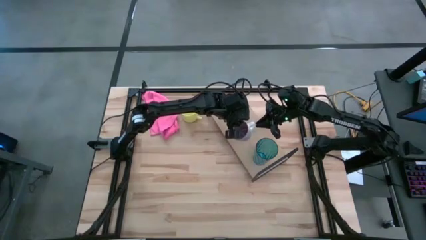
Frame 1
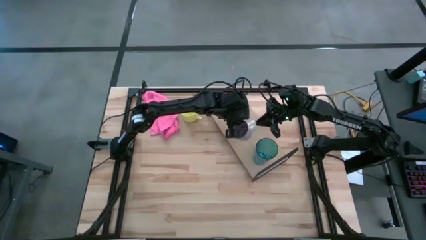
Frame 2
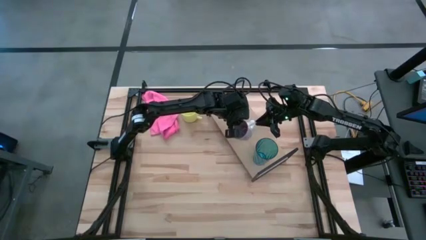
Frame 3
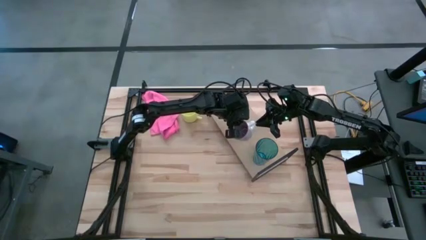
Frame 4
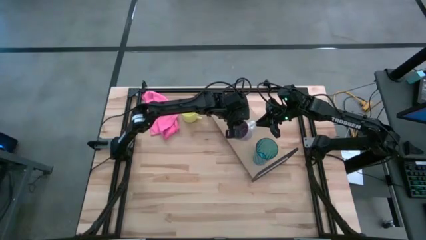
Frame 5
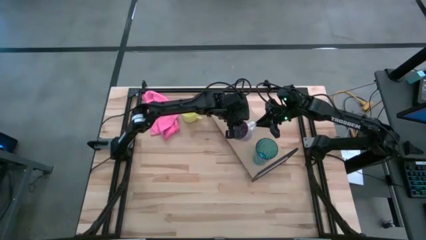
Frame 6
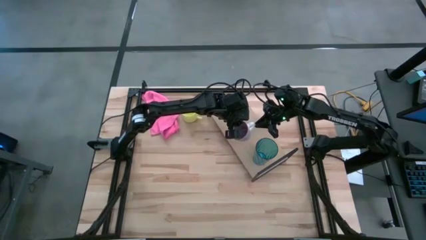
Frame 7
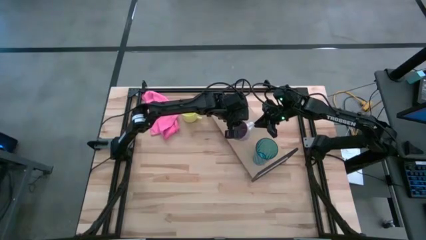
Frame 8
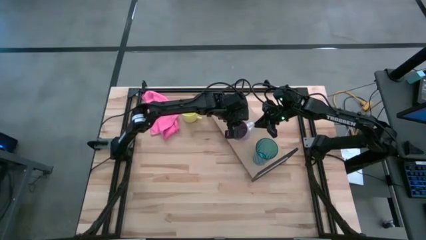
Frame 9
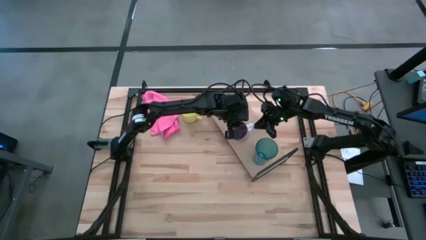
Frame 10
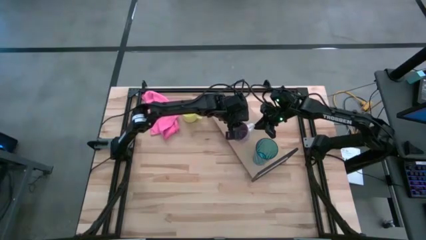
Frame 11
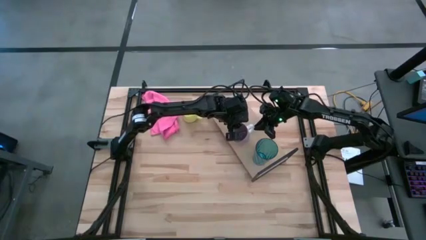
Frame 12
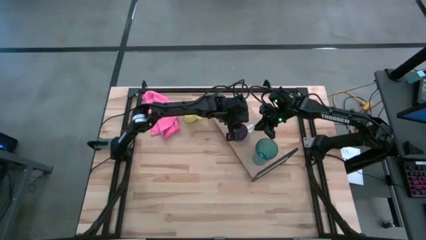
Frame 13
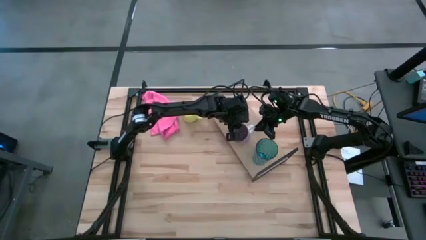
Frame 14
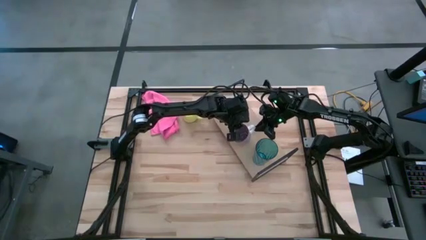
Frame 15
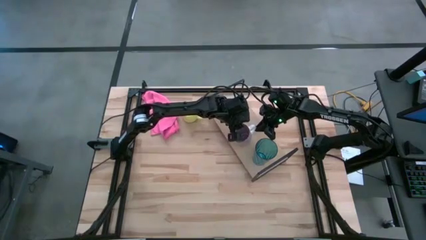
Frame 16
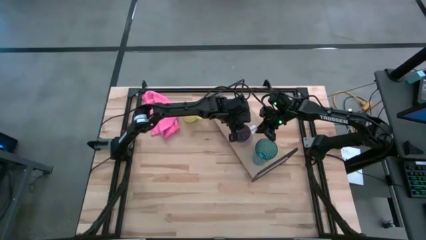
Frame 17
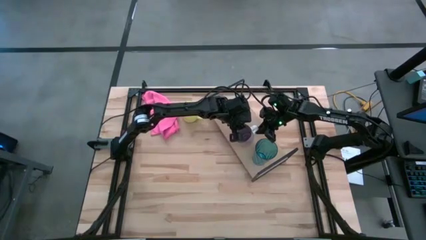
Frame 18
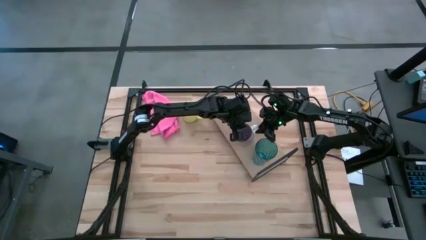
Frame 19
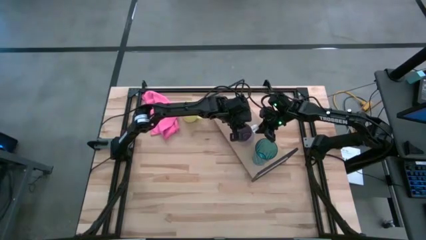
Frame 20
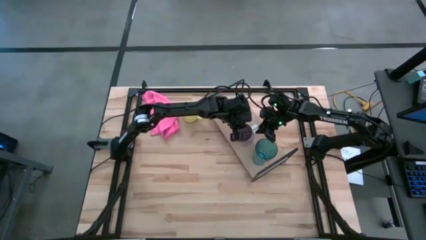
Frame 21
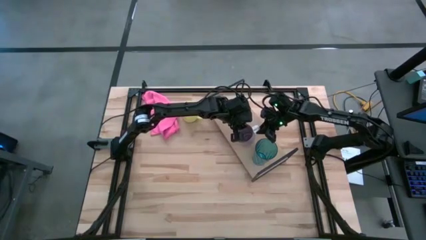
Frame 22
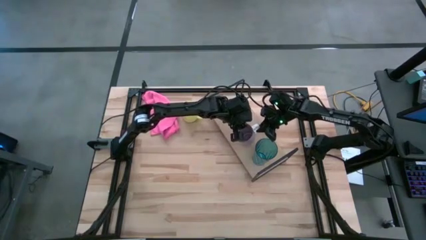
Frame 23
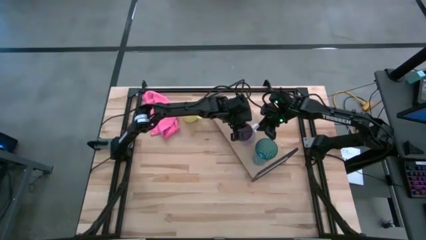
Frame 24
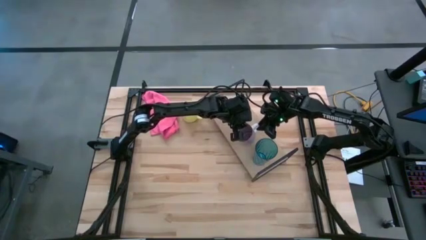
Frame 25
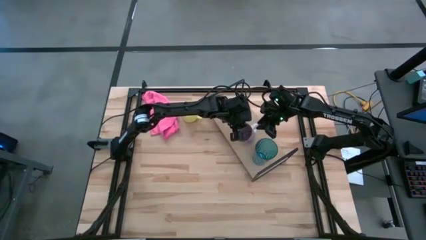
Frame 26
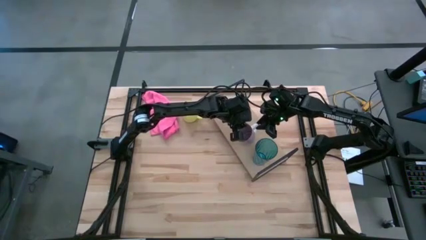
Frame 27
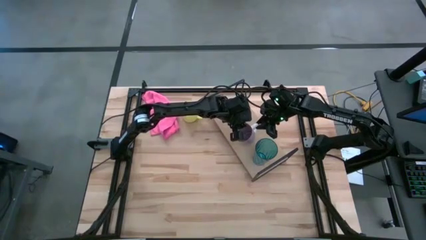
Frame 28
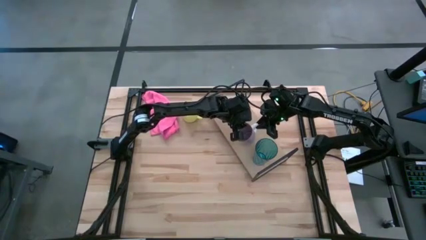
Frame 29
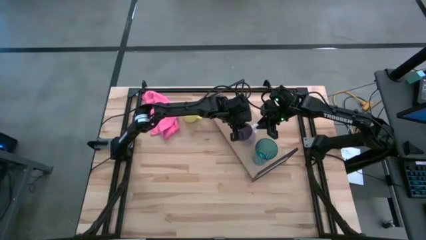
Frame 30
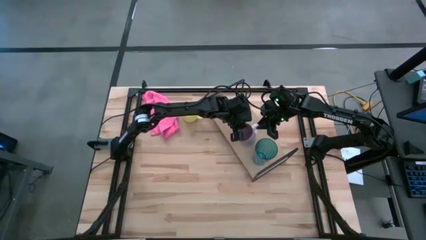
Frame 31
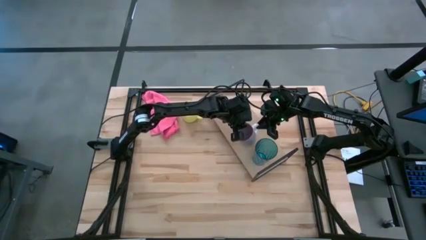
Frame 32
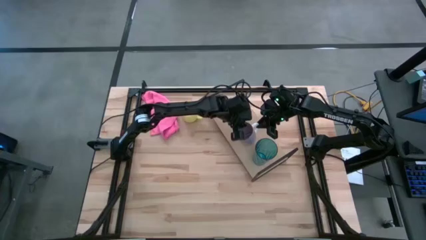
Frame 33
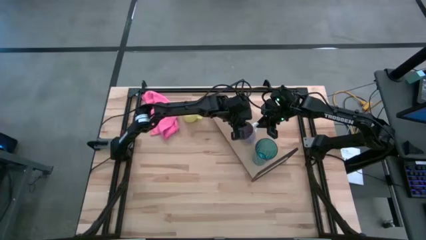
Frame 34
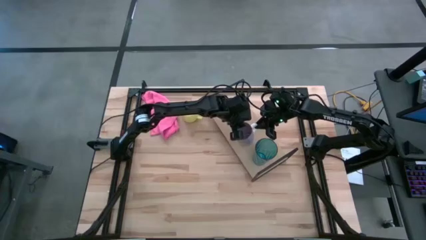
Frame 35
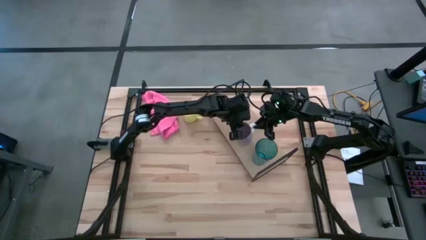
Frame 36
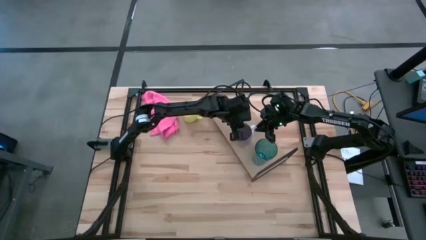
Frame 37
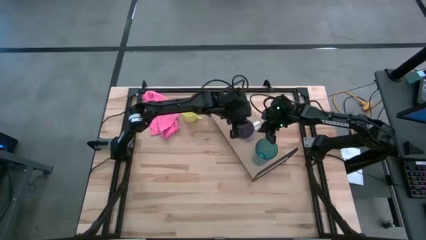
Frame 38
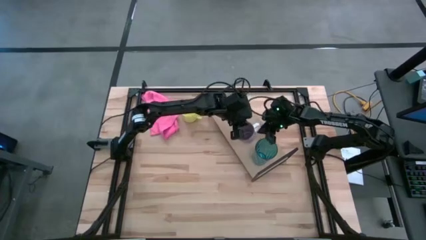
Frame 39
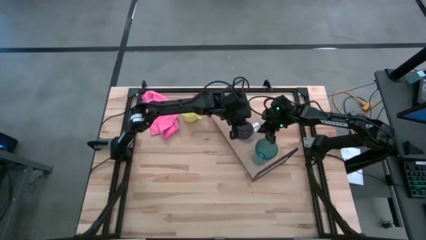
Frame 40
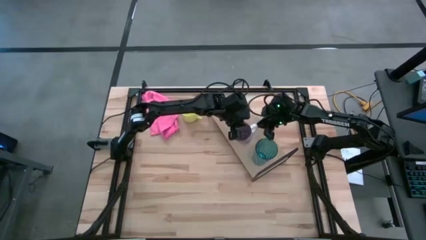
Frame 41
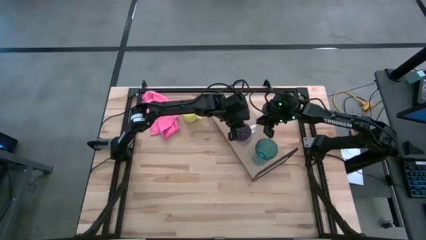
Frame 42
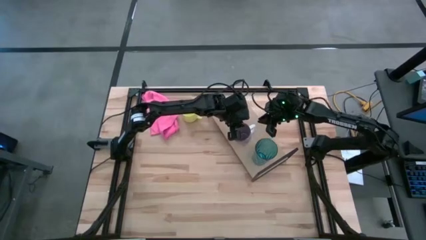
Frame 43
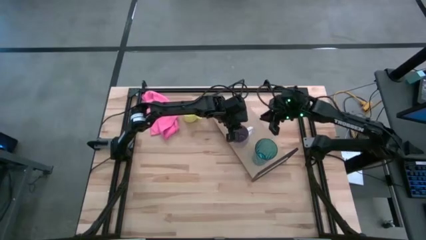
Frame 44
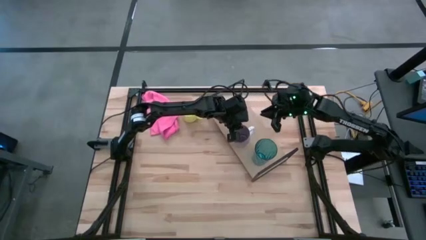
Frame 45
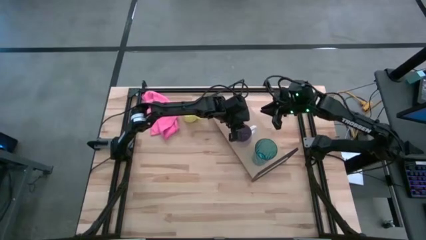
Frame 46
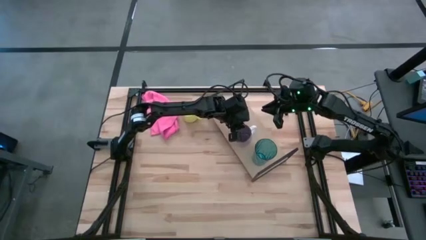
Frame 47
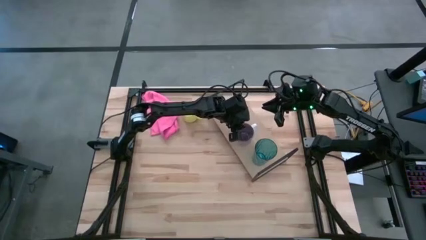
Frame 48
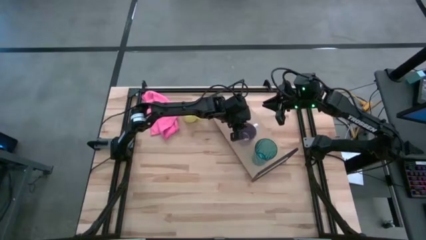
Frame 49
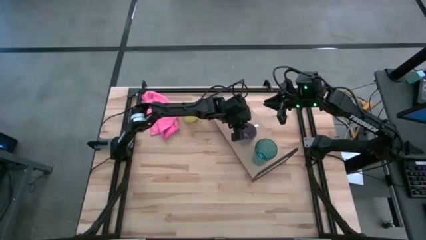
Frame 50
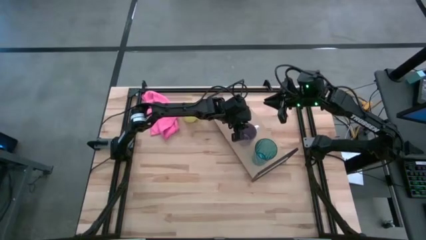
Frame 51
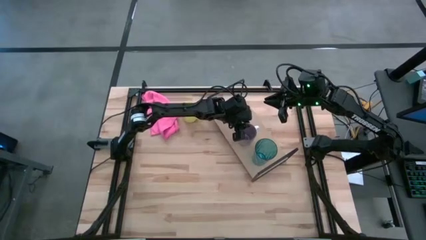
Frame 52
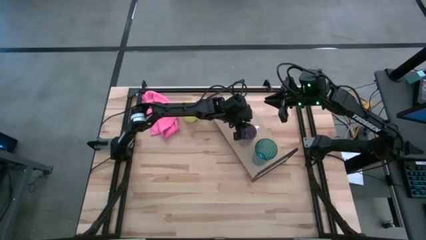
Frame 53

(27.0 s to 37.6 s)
Task: Stack small to large cups/mugs on shelf
Put the purple mug on the shelf
